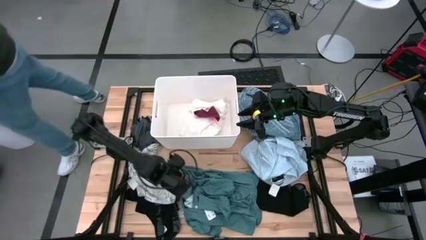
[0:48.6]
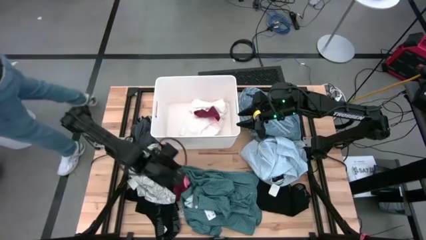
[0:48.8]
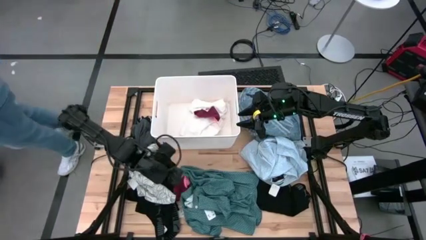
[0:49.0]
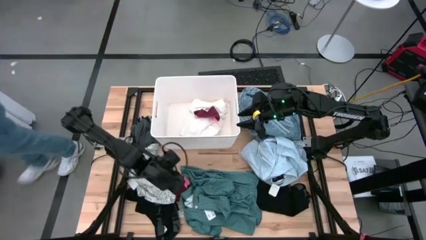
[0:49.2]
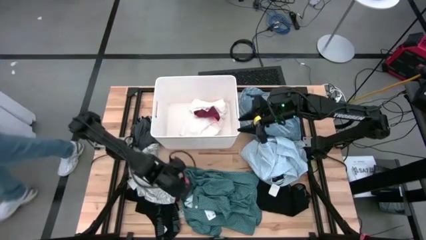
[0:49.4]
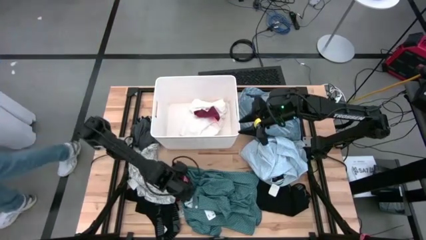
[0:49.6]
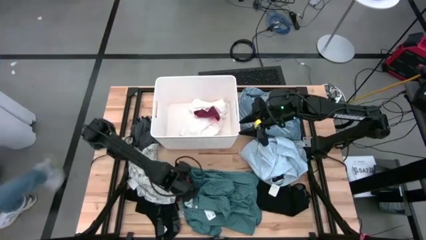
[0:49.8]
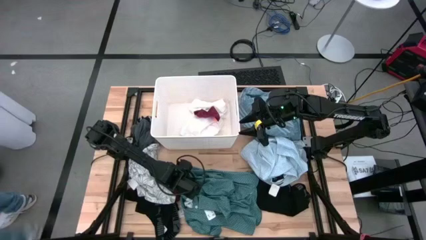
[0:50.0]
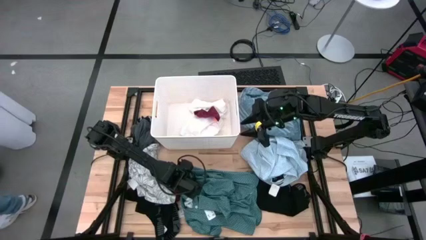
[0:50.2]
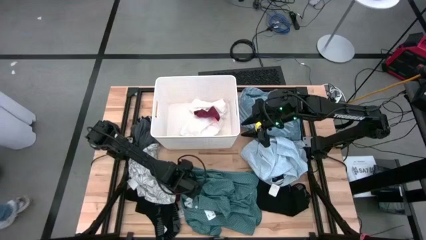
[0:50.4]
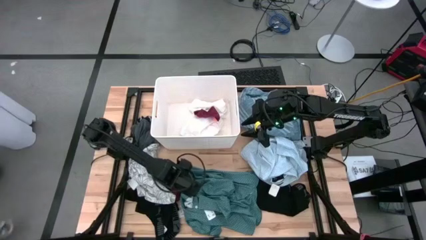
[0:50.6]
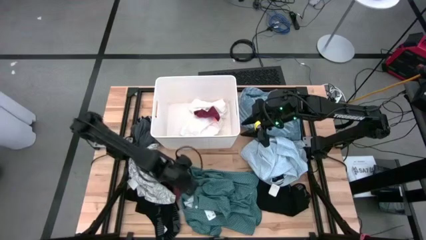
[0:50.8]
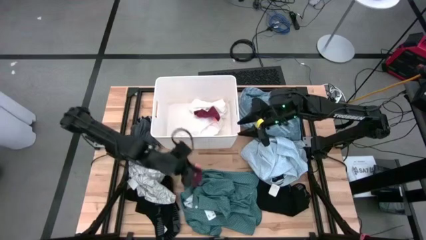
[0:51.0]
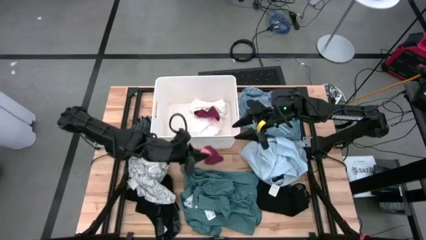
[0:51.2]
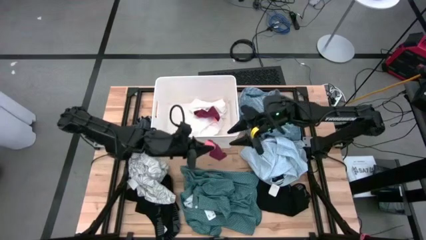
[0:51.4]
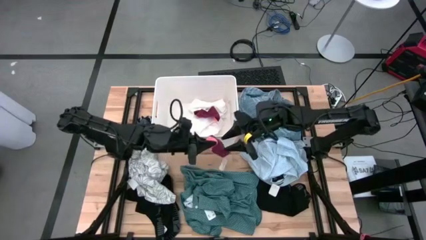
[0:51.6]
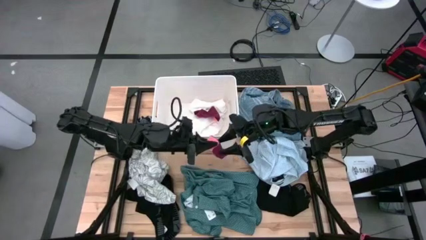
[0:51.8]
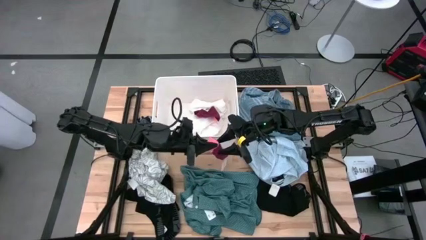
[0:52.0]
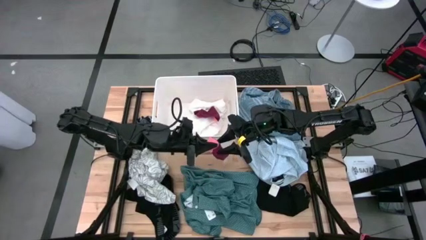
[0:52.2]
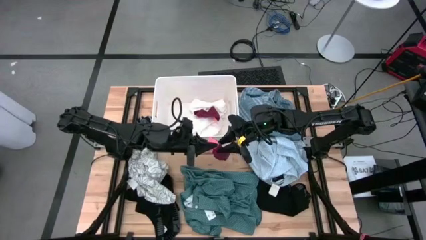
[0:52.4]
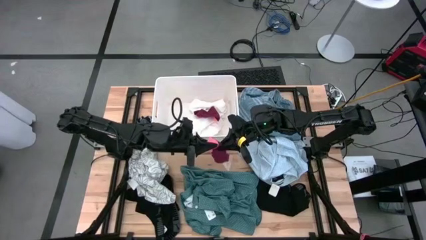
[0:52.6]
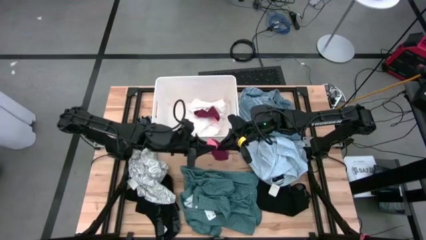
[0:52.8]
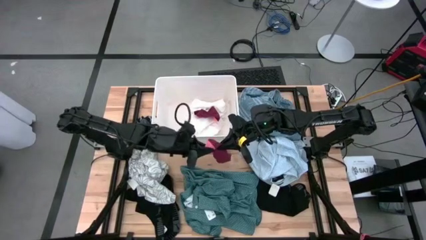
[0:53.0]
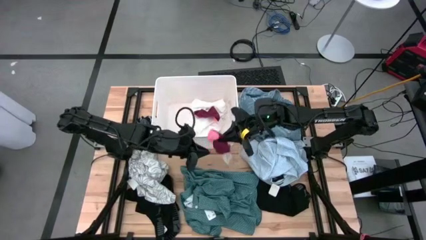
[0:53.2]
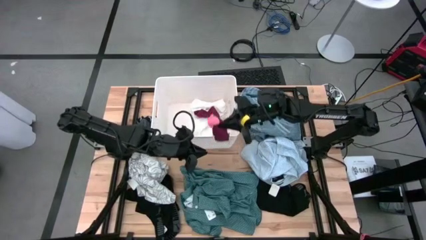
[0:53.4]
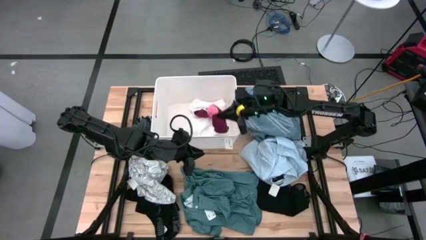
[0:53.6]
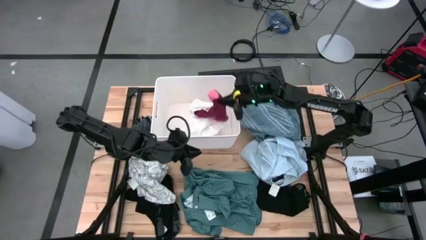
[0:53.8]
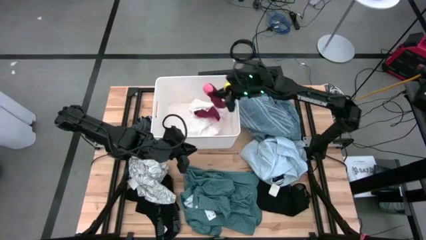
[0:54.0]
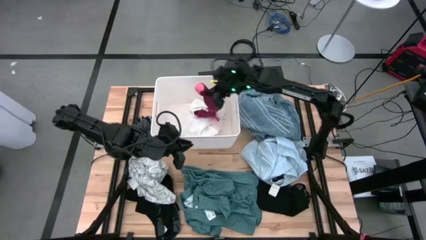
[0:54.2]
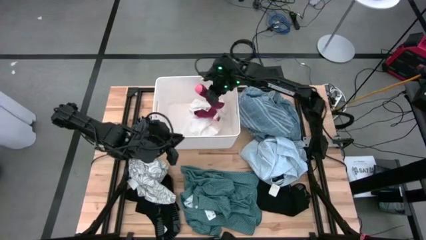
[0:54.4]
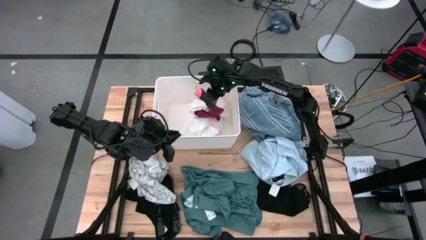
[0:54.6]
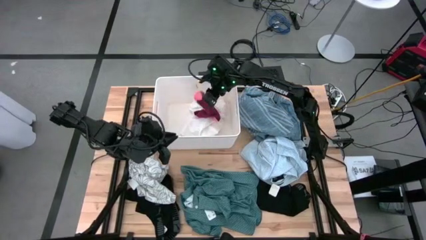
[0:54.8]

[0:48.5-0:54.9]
Task: Sort clothes
Put the red sock into the white laundry organizer

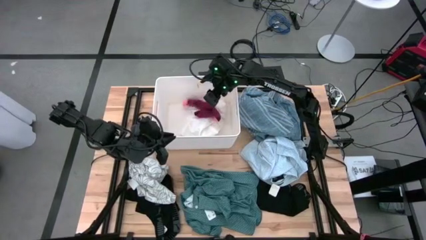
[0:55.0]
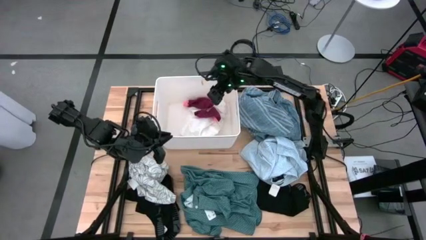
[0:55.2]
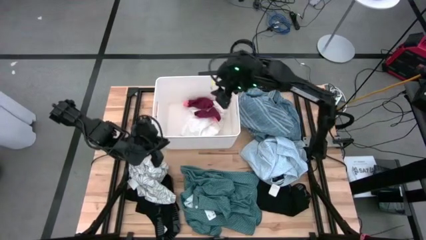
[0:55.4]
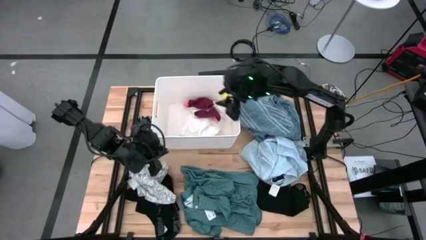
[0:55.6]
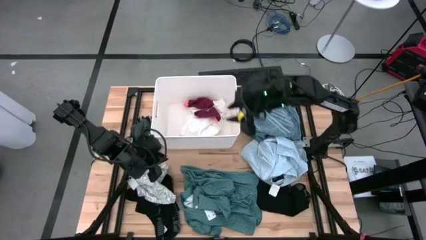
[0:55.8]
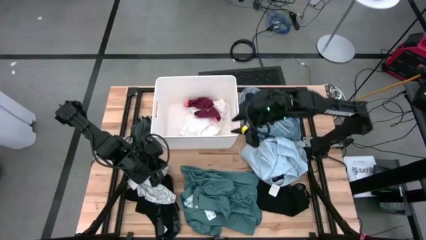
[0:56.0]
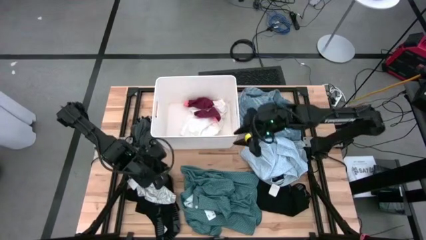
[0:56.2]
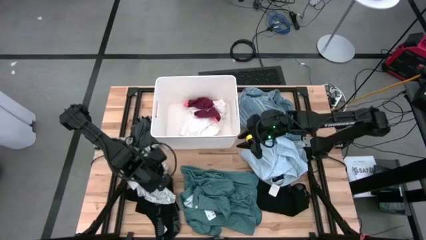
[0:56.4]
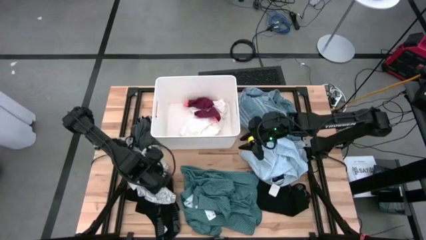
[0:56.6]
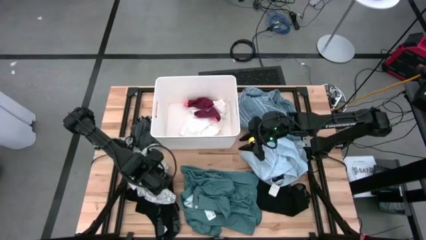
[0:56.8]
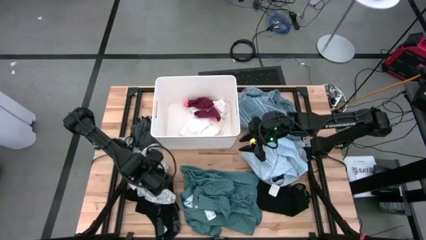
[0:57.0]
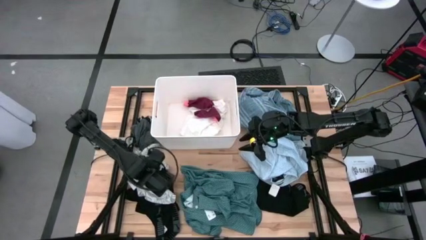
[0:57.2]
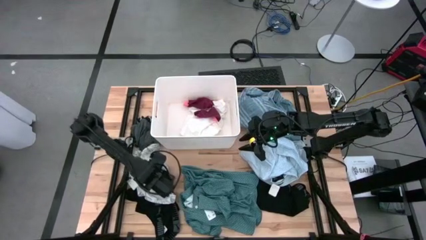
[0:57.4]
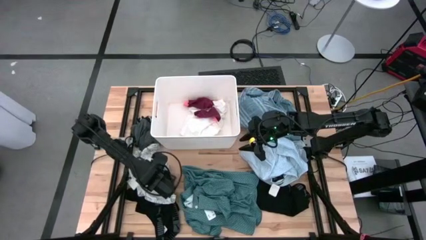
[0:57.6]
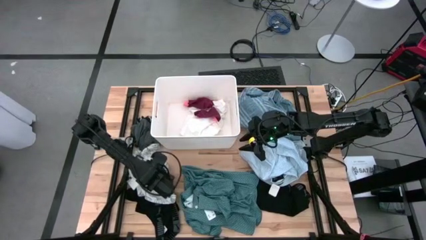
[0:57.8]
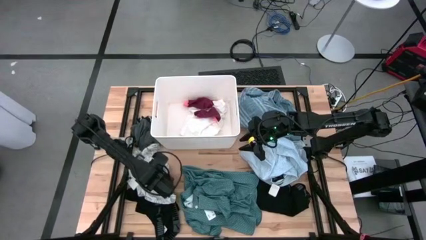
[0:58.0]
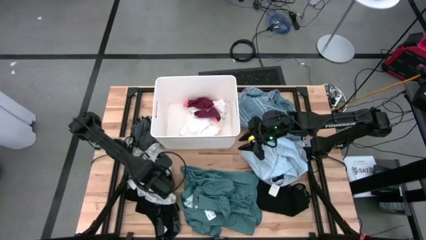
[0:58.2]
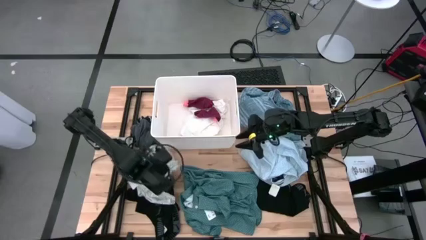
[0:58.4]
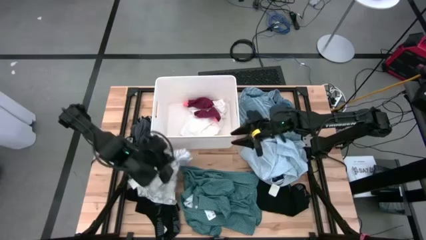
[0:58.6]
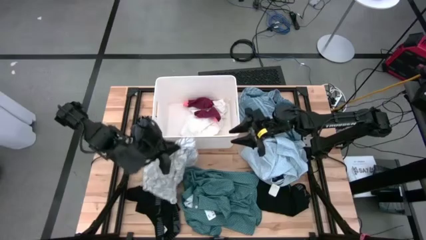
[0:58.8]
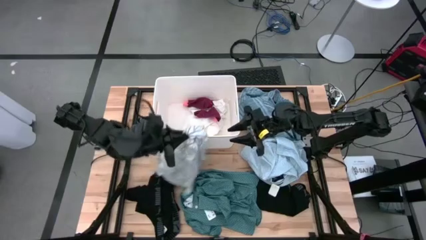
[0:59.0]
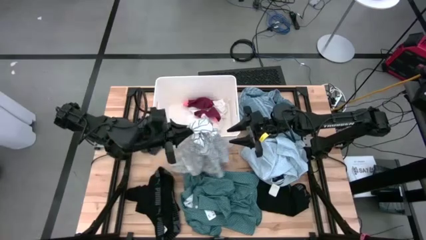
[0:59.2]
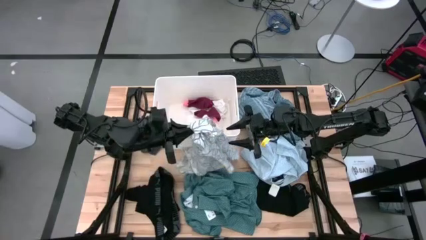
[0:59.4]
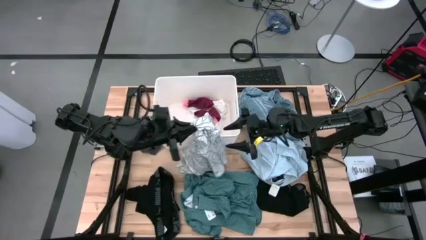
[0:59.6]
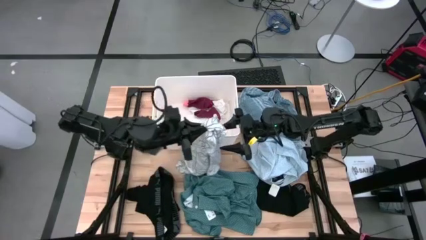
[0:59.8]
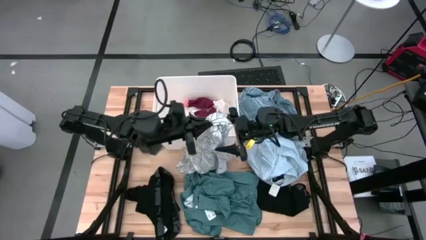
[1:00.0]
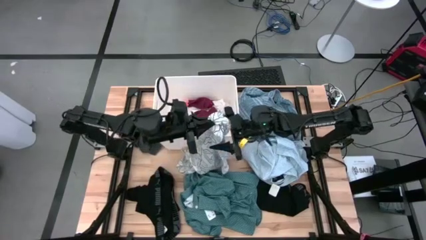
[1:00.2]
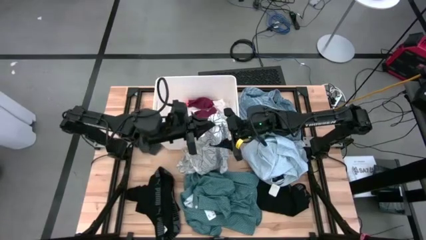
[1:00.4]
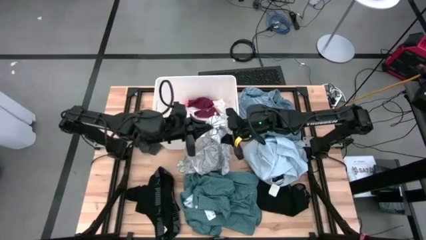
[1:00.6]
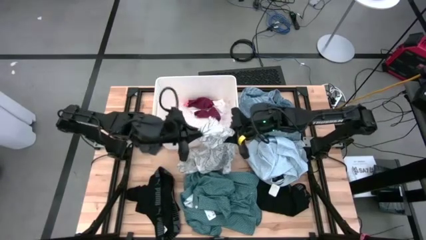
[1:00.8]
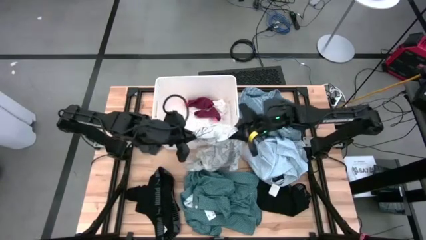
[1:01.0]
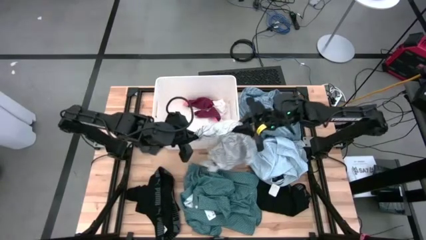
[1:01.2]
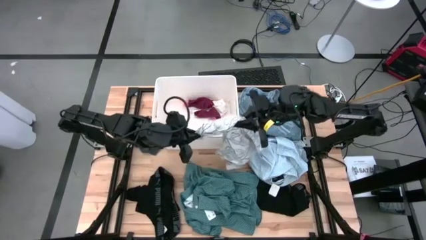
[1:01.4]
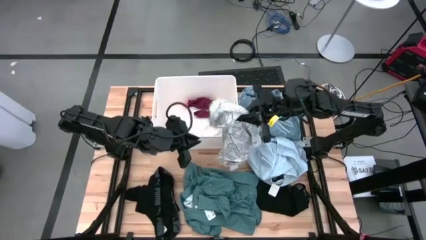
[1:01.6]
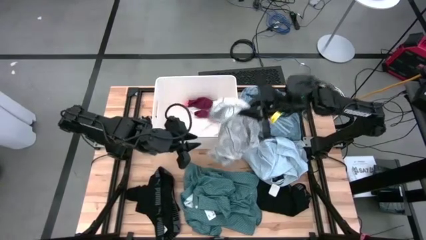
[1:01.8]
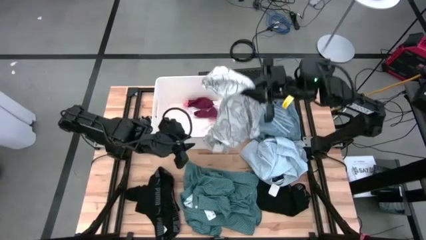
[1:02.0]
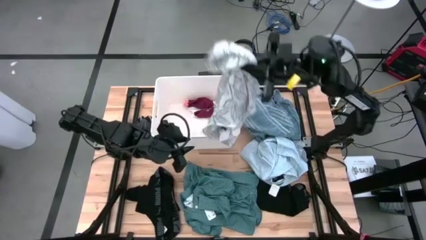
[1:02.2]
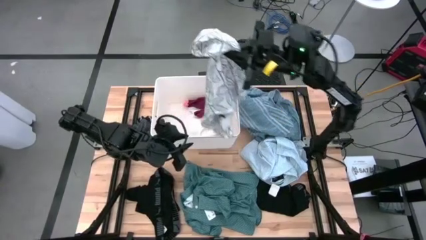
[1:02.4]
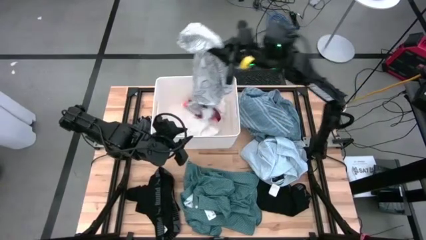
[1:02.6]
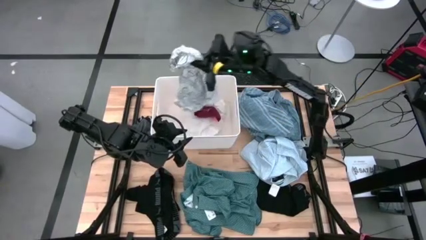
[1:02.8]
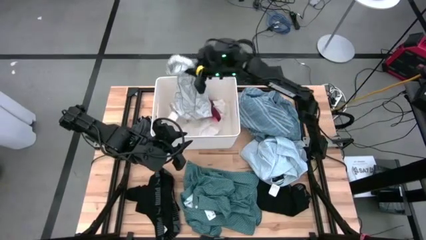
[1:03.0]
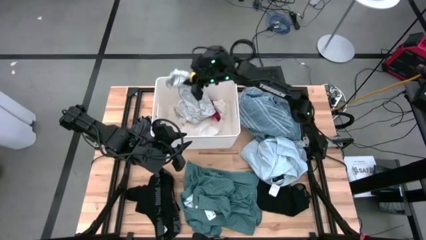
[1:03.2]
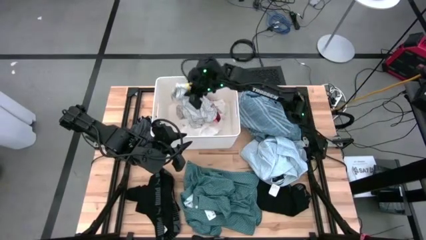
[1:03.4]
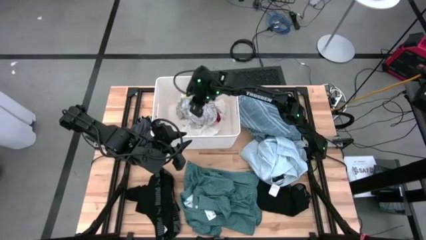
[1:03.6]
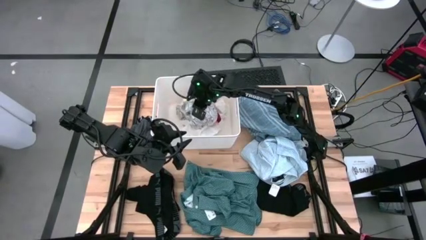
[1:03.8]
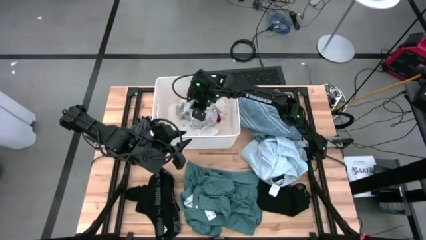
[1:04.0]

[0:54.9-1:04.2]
Put the white polo shirt into the white laundry organizer

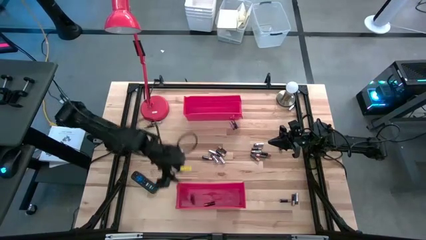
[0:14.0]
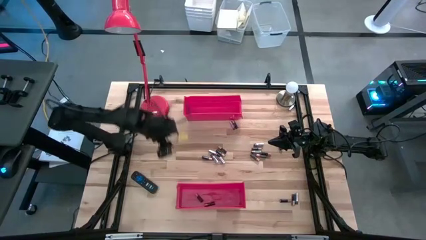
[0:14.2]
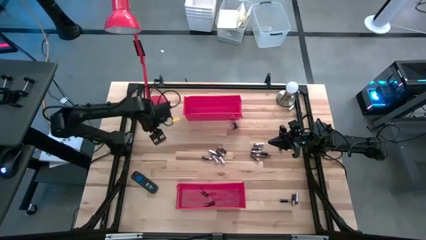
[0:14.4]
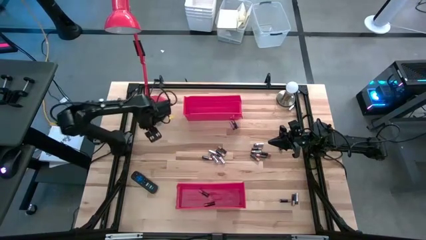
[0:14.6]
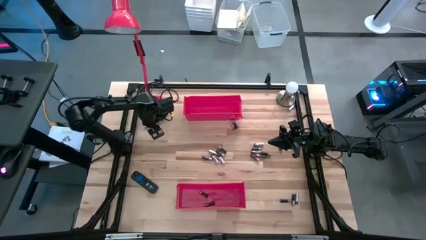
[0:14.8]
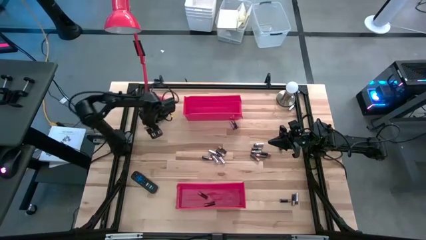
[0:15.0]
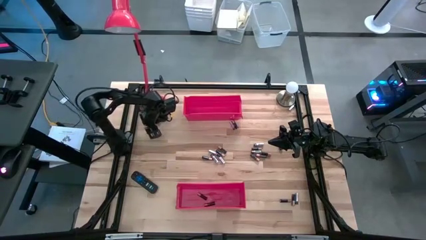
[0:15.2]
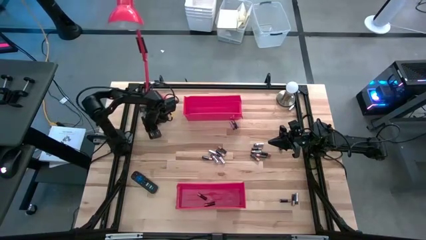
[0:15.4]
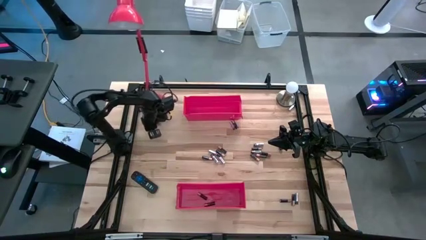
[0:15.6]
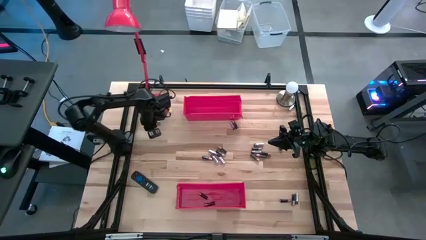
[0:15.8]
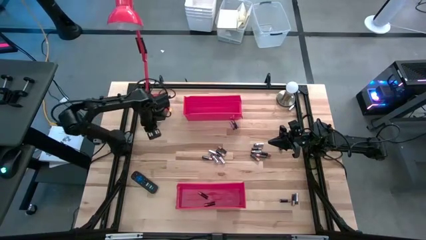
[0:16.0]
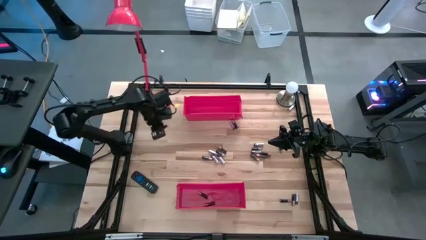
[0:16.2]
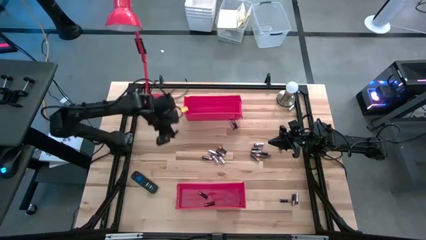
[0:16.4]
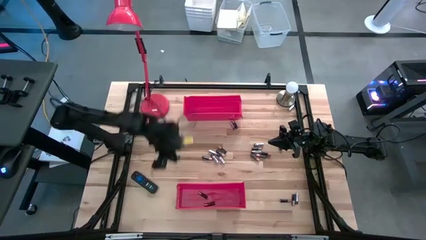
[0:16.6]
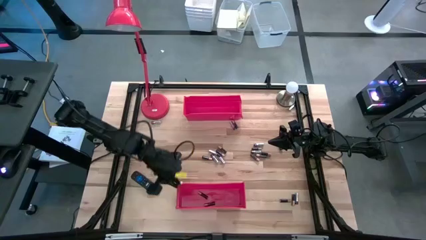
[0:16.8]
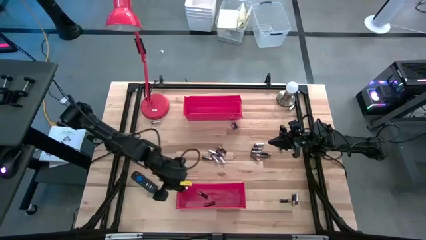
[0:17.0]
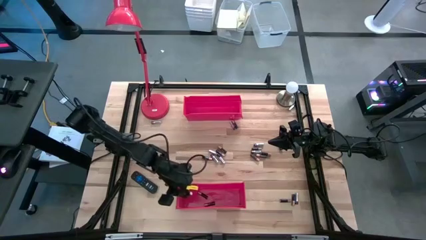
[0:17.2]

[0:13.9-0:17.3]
Task: Sort batteries
Put the brown battery into the bottom red bin
